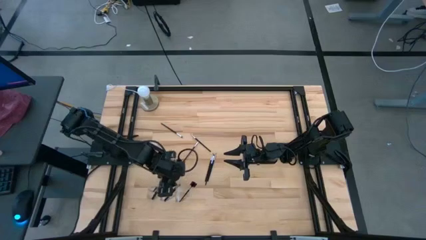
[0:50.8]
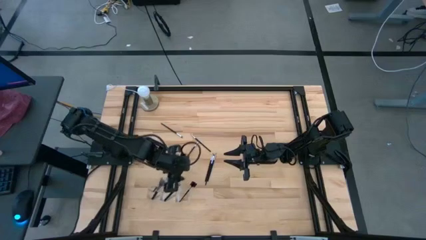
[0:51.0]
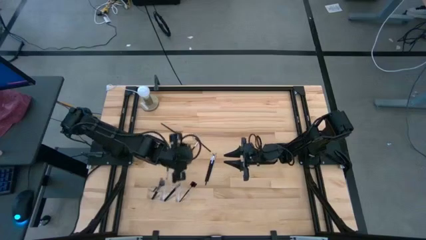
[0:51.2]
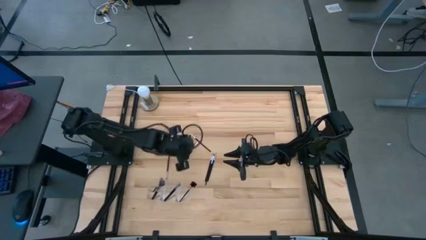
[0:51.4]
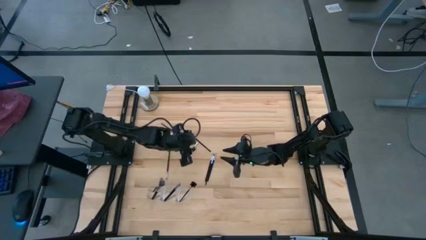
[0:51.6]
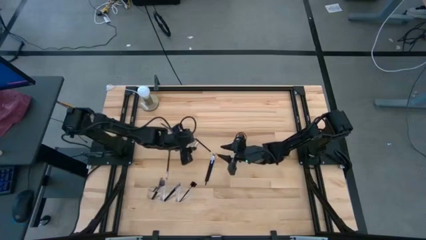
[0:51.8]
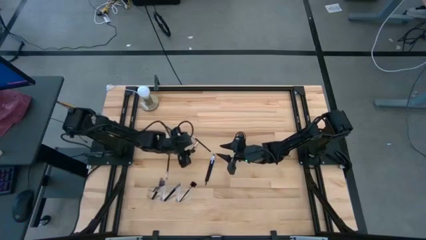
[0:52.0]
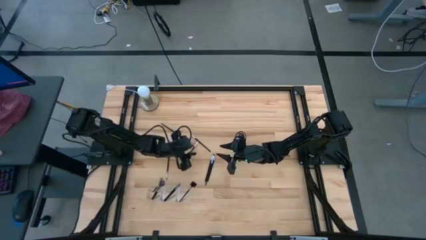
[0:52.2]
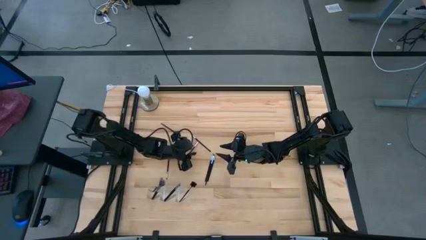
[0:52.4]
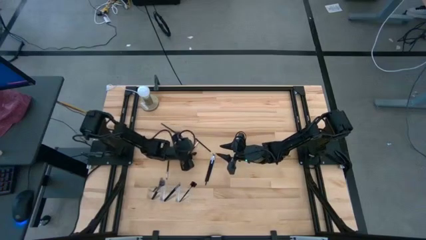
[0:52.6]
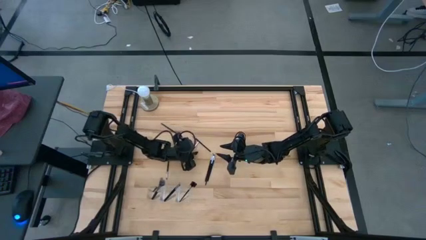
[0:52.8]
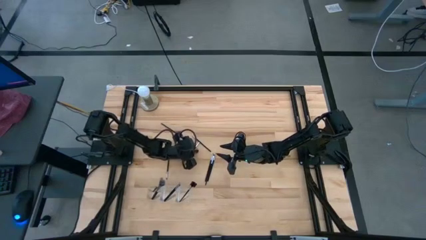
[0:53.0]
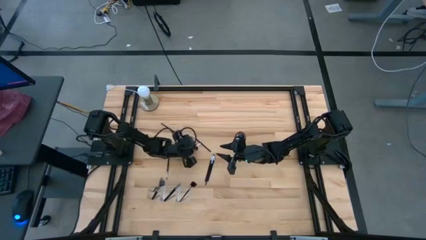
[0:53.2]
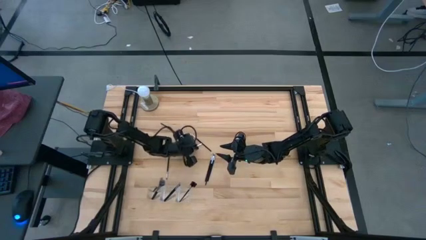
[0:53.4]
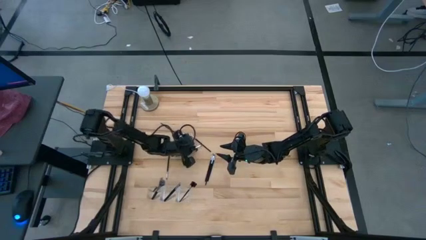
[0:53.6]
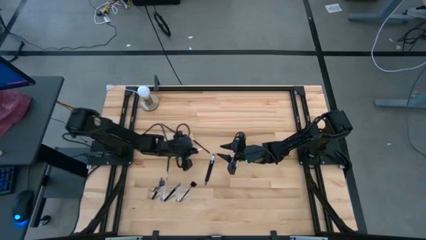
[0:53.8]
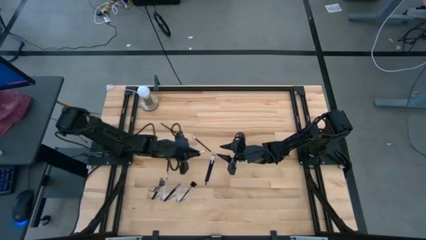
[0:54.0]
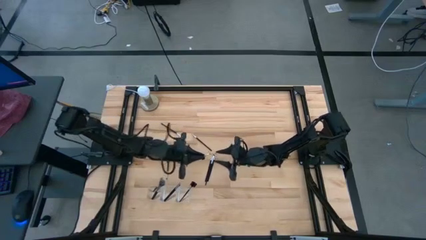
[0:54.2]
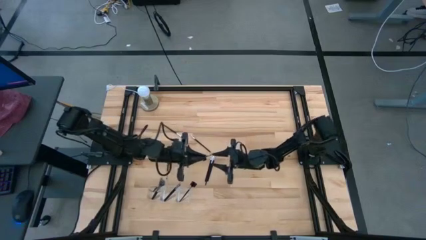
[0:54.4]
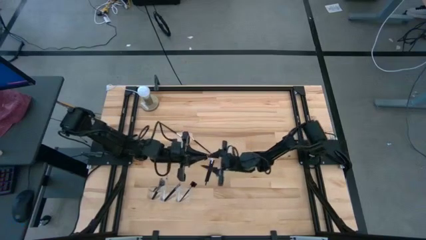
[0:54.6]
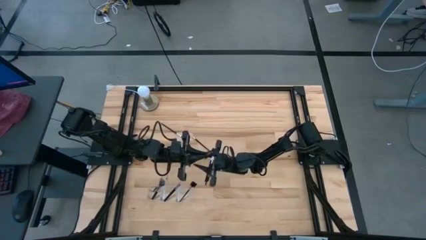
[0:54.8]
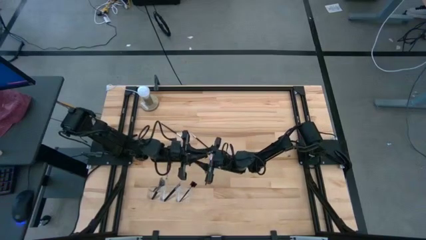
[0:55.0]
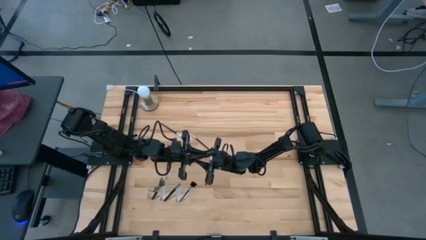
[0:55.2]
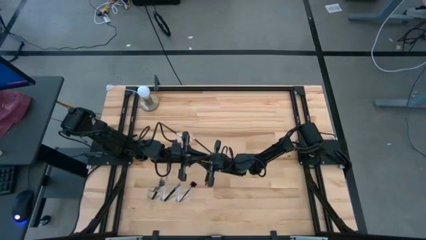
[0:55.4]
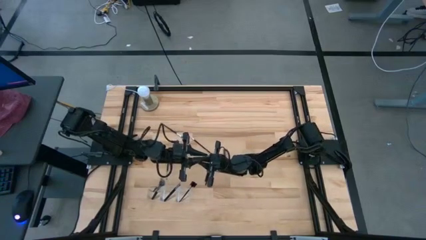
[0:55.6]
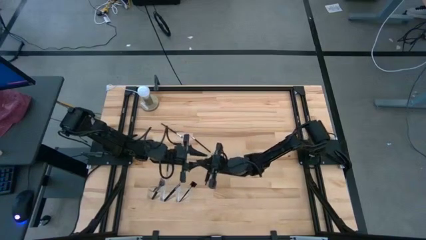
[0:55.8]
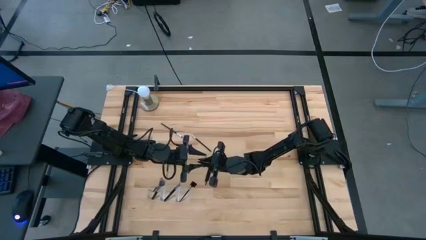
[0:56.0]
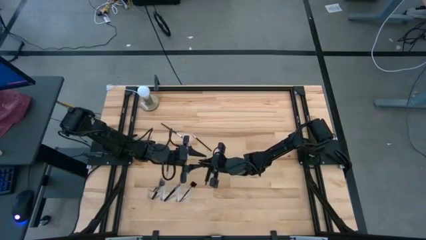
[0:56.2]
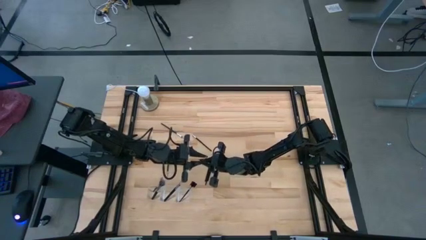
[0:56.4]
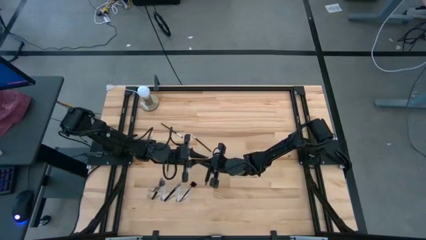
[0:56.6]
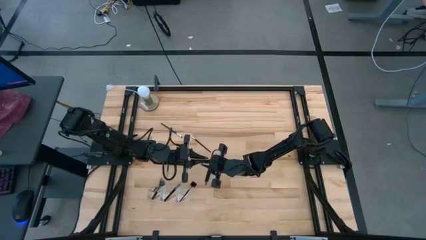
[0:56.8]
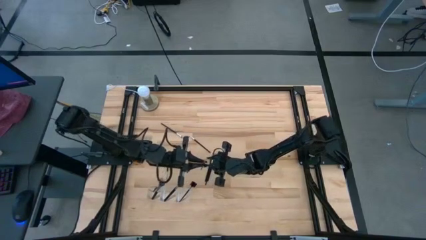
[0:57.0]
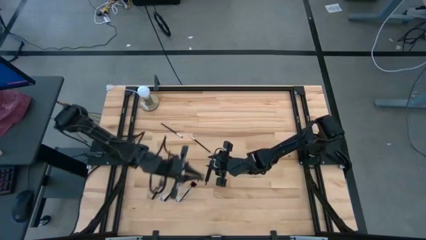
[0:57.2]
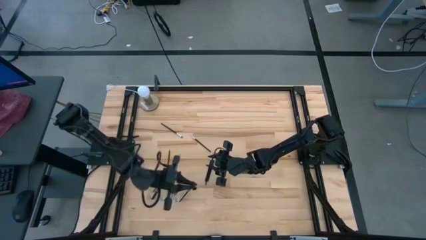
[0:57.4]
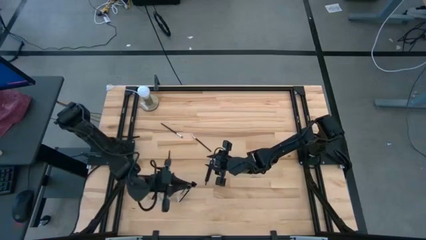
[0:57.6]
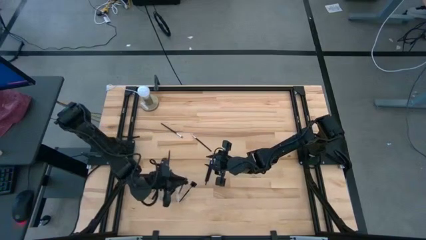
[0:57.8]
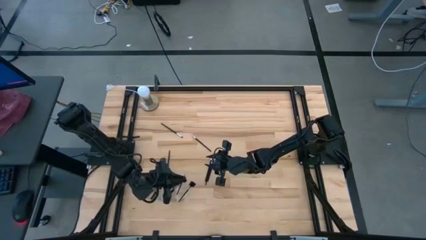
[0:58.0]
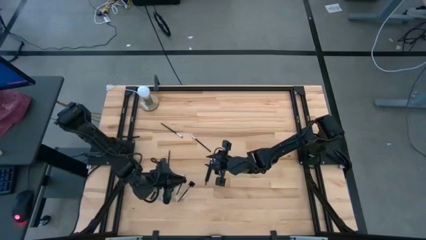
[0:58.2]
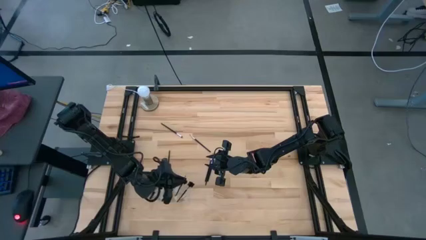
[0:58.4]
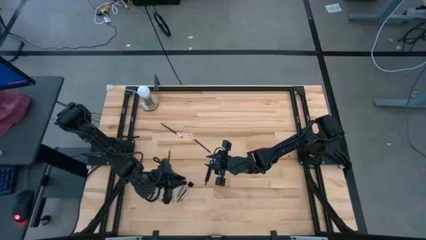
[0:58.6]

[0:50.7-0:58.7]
Task: Put items in baskets/containers
Put the black eyeshadow brush into the transparent organizer

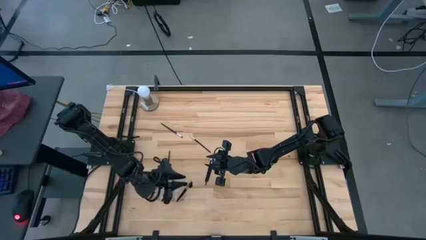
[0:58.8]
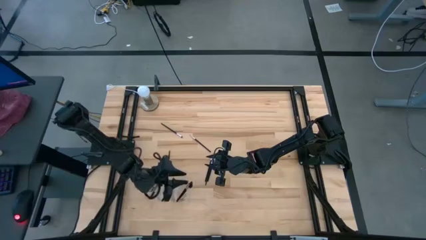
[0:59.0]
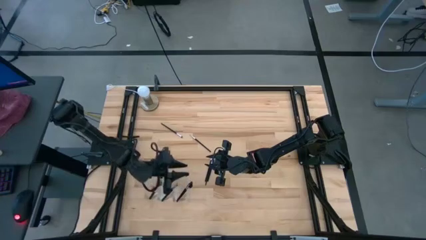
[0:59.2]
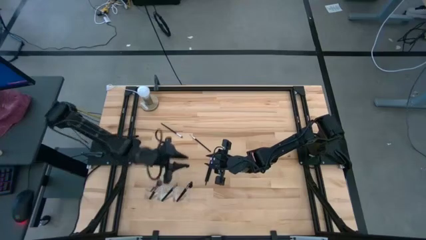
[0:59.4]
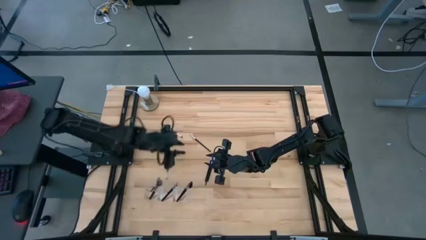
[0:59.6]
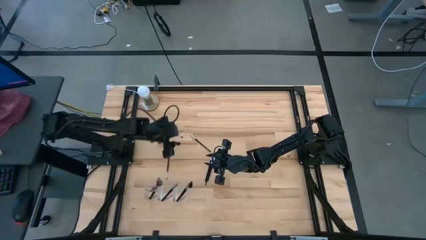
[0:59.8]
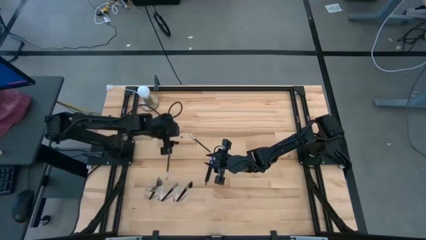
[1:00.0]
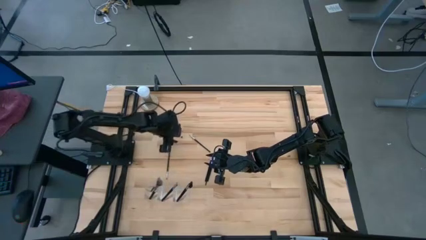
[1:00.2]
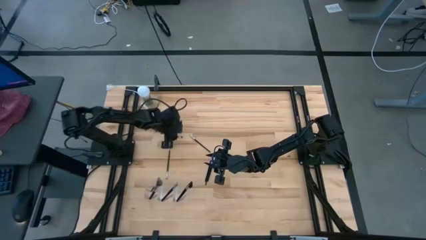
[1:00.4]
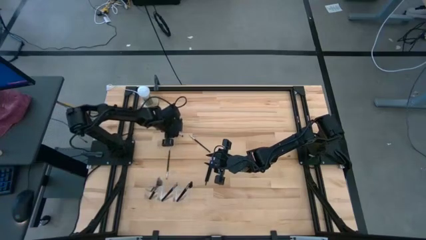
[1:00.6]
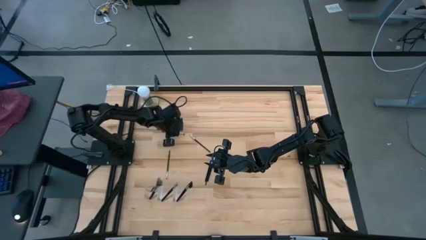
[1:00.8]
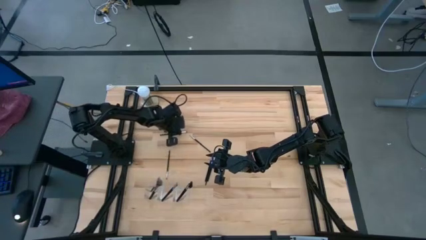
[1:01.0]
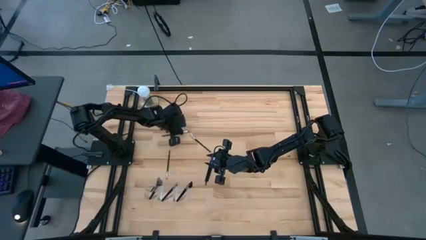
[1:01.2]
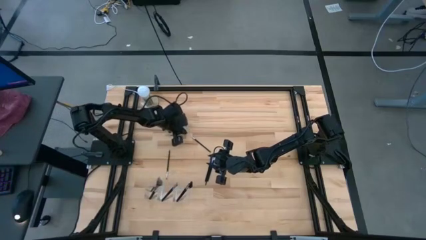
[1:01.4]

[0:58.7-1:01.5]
Put the black eyeshadow brush into the transparent organizer

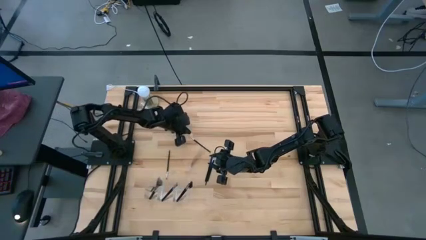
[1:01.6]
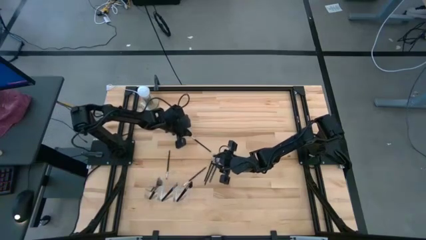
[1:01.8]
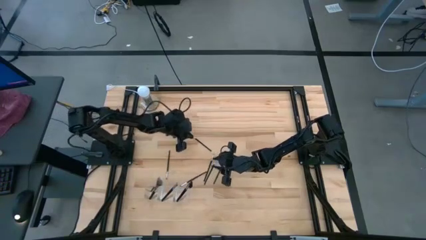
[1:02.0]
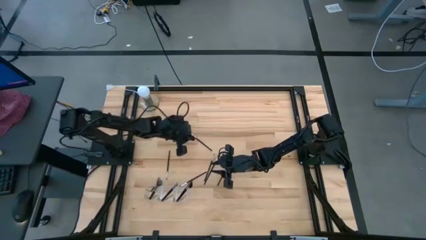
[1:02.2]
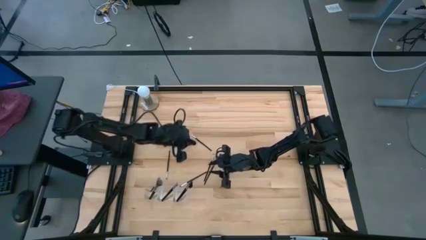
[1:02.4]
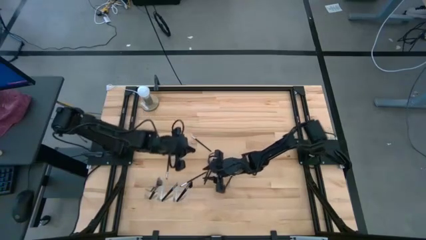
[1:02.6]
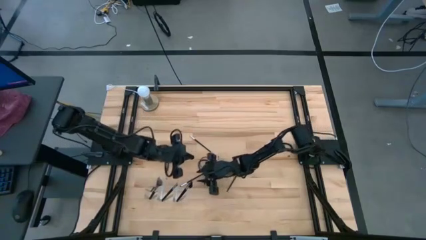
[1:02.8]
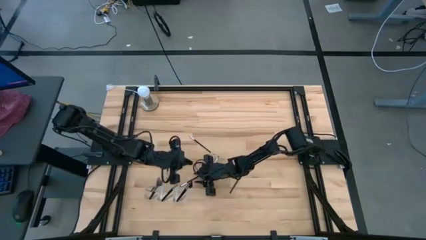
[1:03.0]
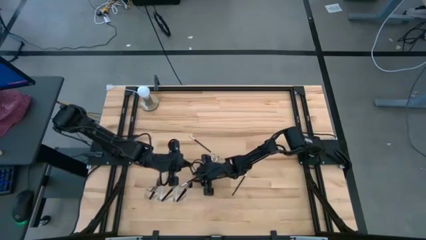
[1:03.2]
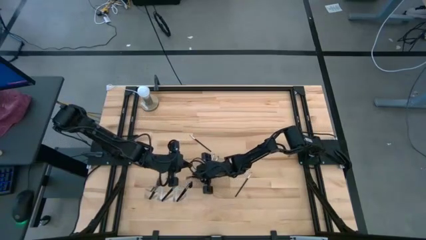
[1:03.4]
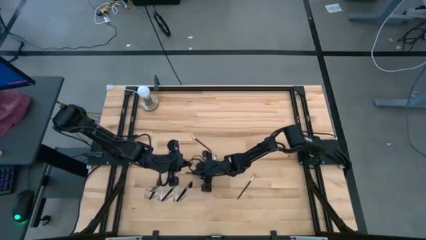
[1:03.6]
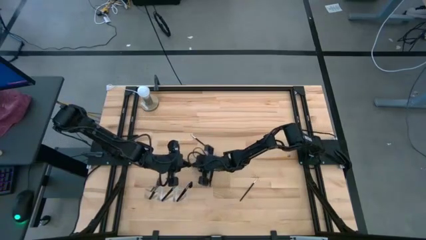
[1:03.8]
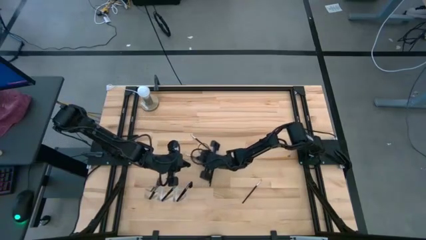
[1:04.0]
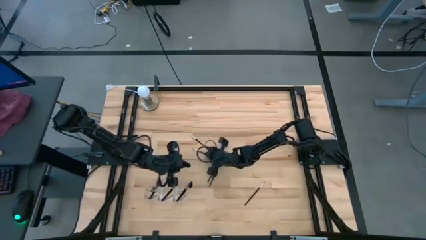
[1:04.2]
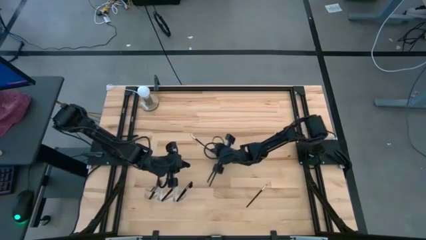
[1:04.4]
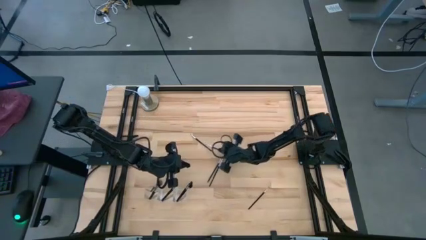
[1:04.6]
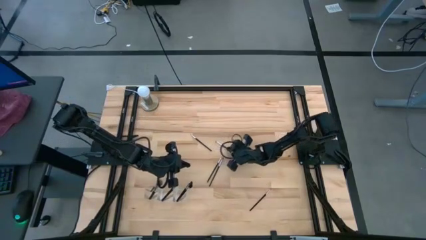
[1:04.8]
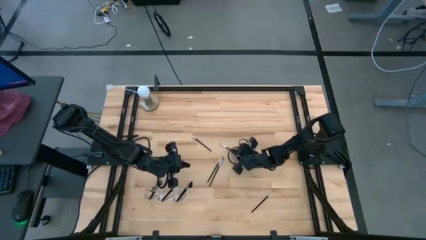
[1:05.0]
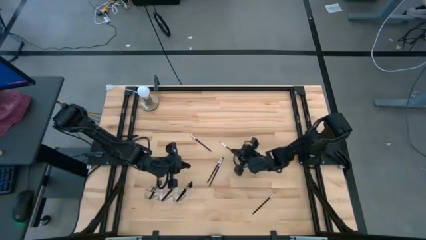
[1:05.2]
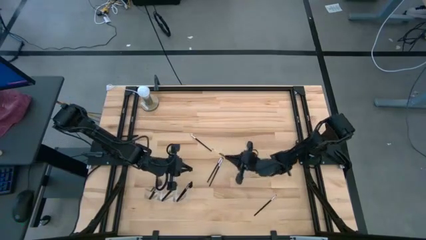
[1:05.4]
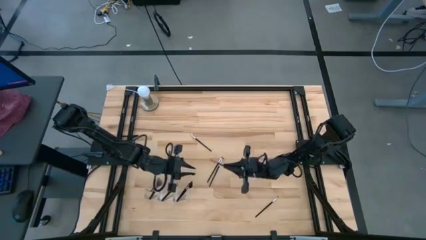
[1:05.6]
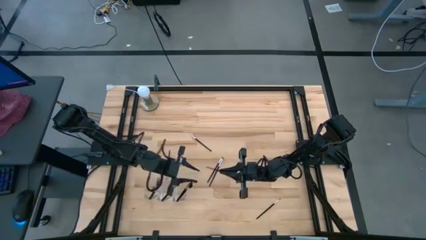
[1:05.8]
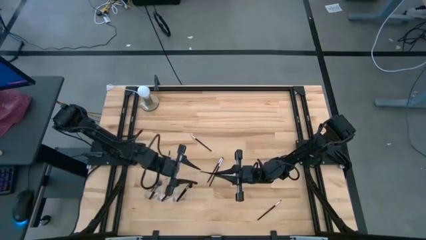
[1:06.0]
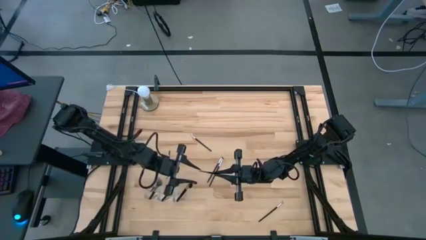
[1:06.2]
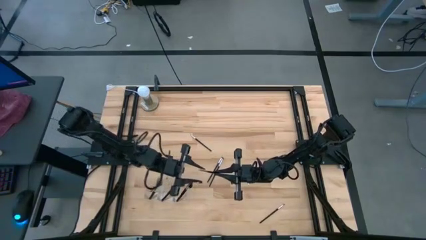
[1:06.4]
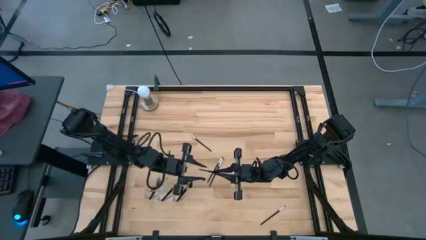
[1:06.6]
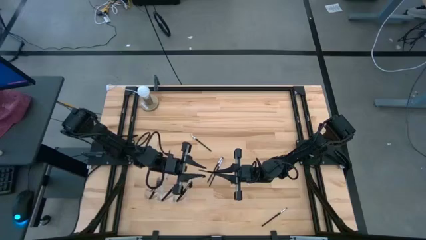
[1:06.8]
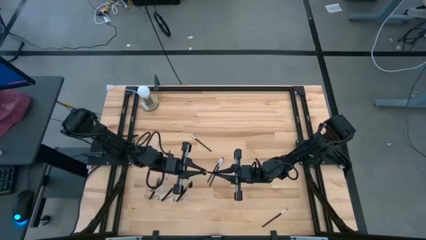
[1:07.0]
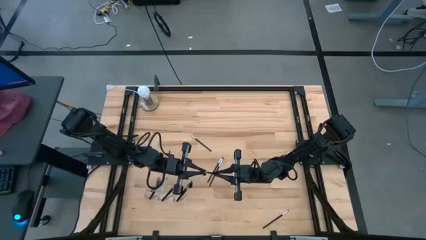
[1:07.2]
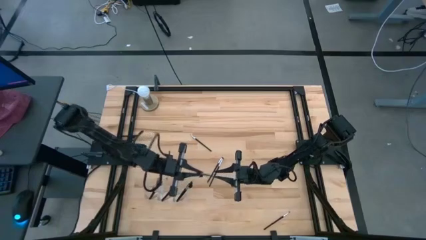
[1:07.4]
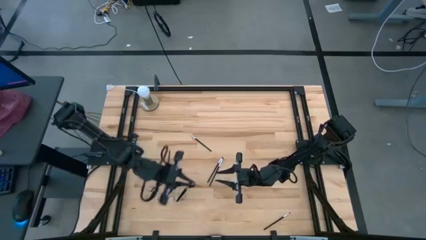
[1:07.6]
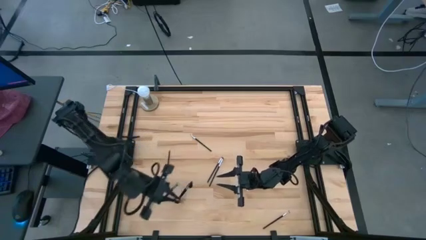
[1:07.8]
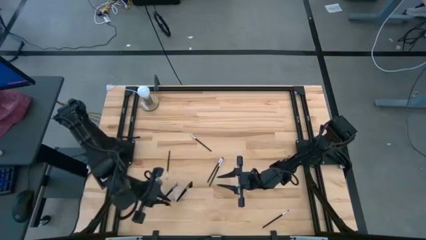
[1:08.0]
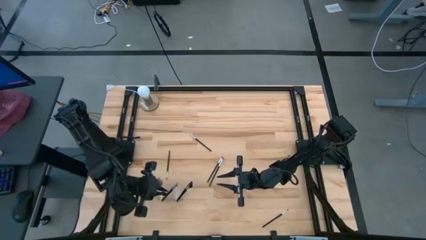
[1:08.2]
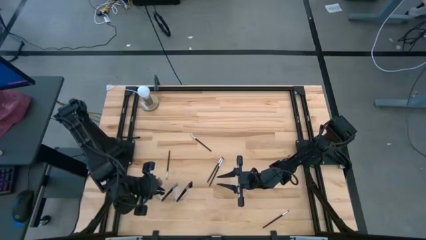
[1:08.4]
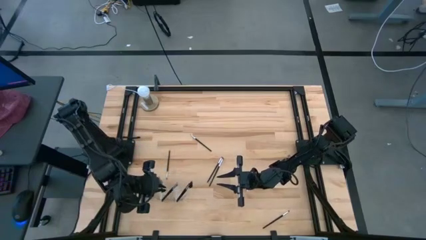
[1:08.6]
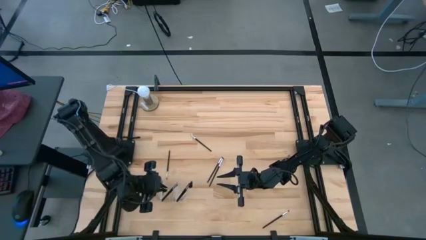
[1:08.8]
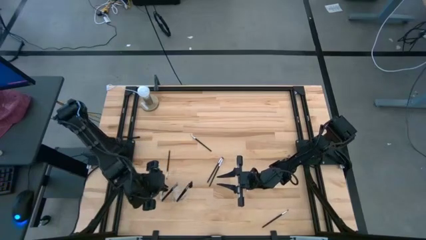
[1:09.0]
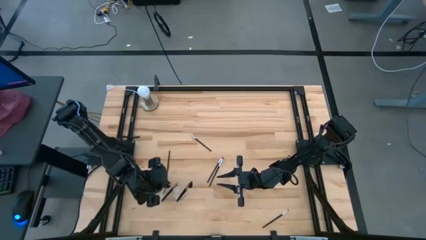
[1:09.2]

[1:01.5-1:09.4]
Put the black eyeshadow brush into the transparent organizer
